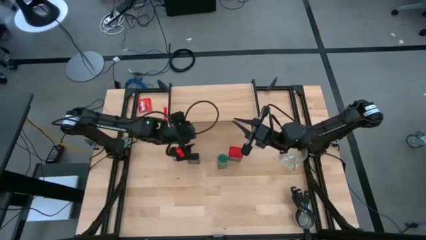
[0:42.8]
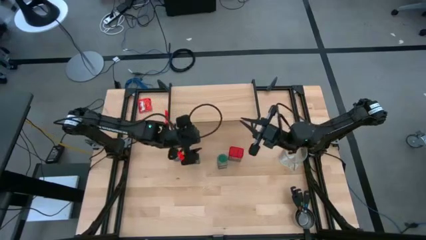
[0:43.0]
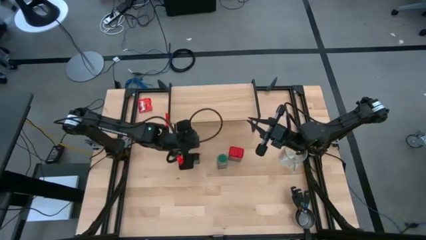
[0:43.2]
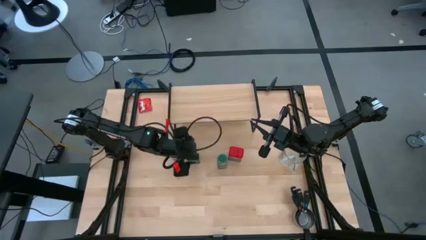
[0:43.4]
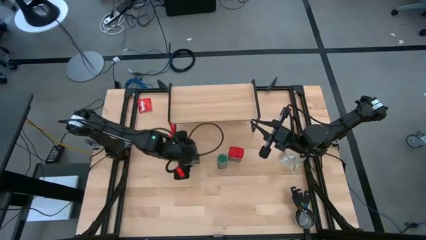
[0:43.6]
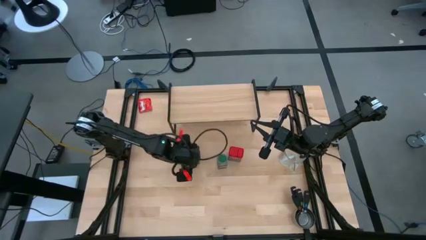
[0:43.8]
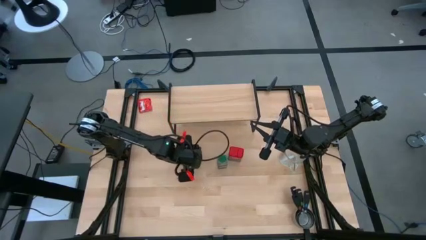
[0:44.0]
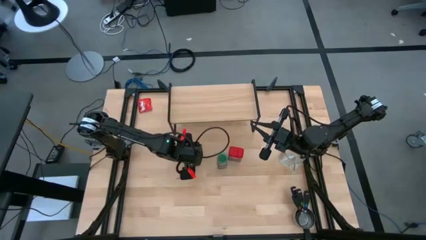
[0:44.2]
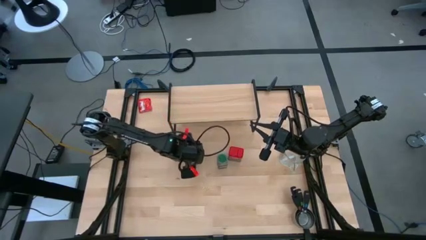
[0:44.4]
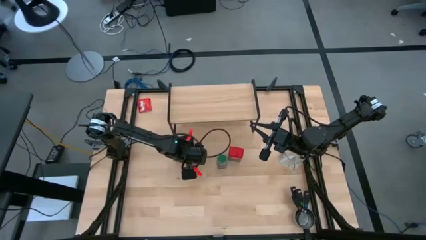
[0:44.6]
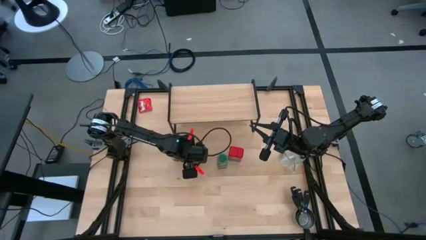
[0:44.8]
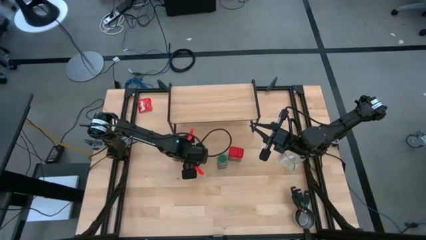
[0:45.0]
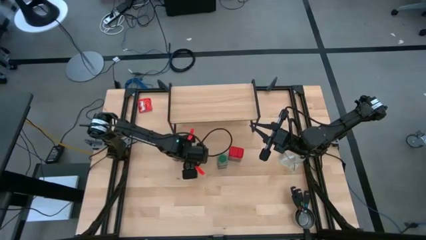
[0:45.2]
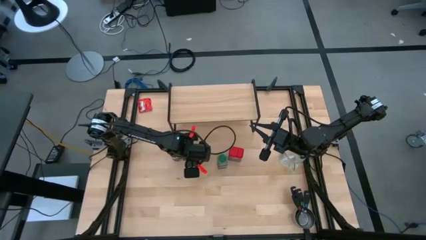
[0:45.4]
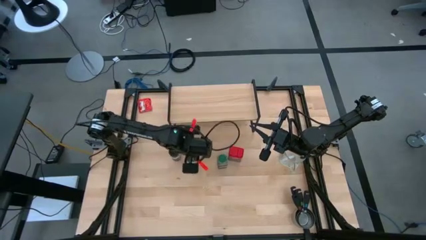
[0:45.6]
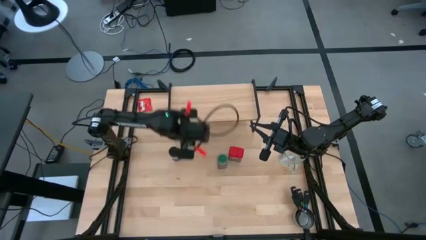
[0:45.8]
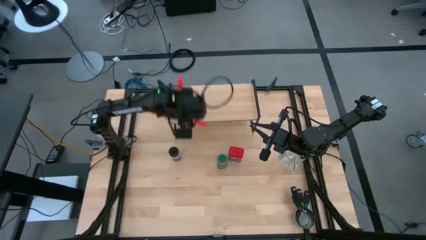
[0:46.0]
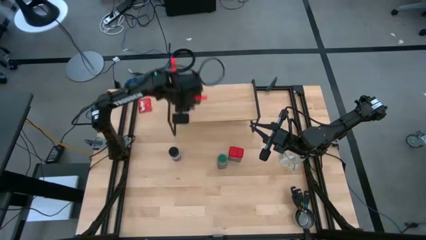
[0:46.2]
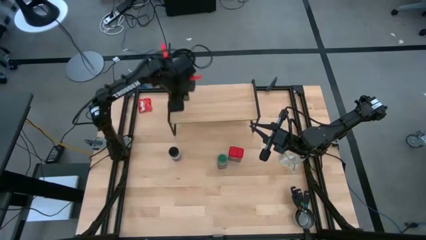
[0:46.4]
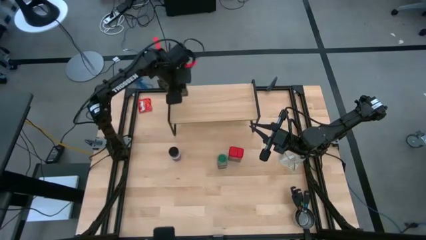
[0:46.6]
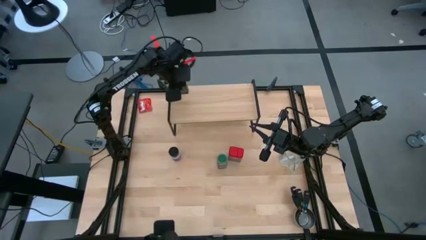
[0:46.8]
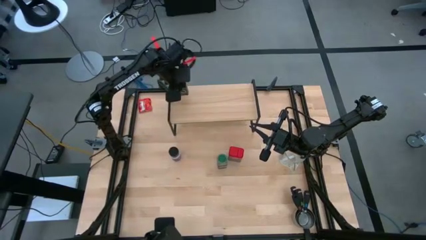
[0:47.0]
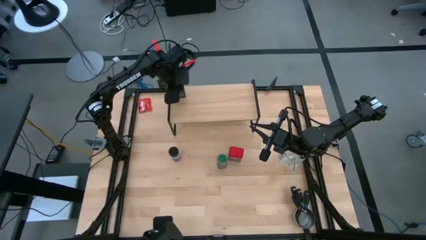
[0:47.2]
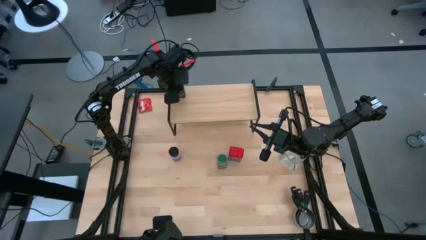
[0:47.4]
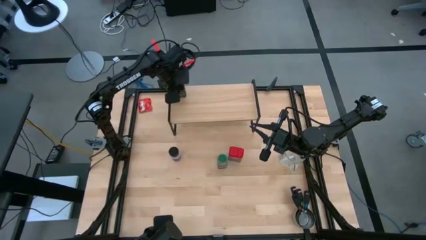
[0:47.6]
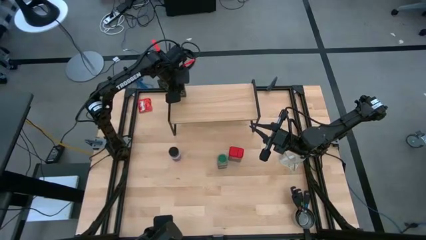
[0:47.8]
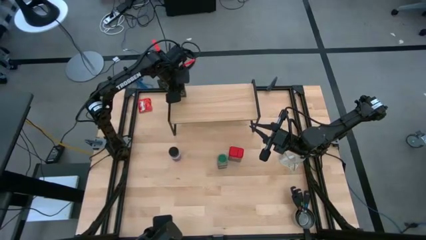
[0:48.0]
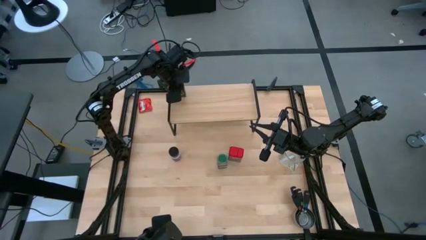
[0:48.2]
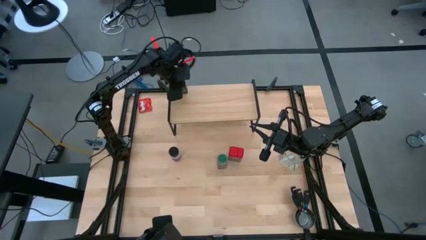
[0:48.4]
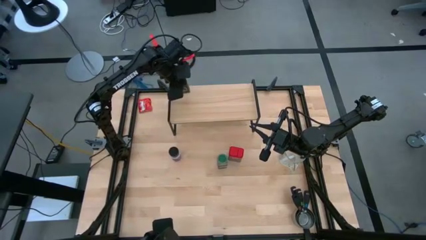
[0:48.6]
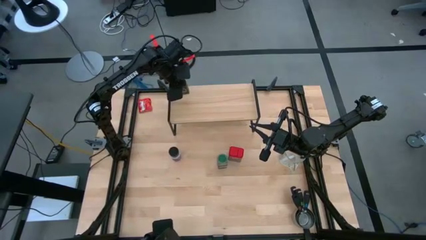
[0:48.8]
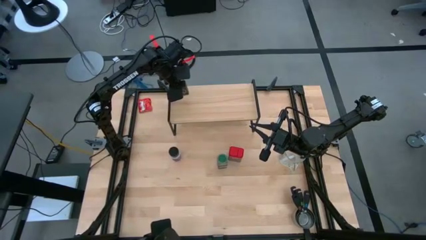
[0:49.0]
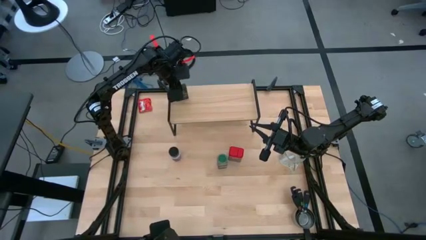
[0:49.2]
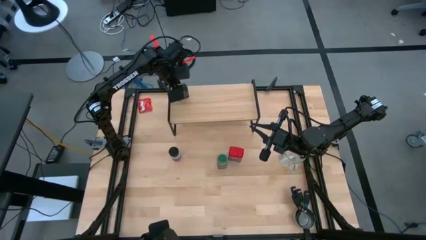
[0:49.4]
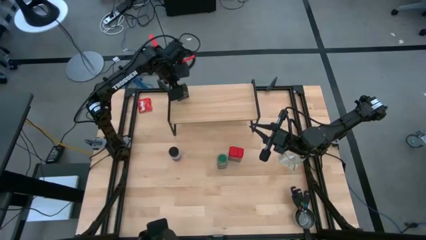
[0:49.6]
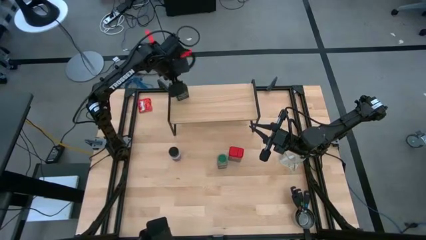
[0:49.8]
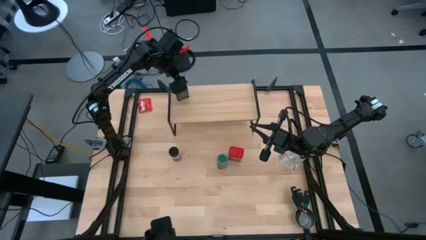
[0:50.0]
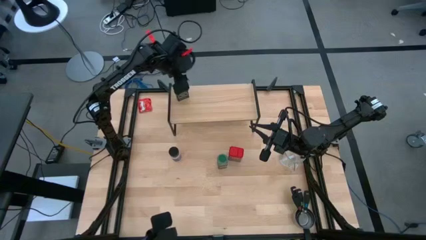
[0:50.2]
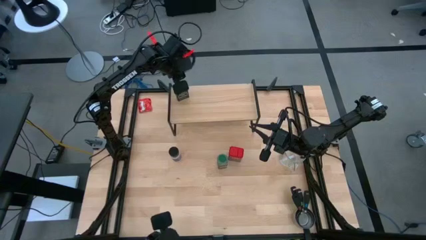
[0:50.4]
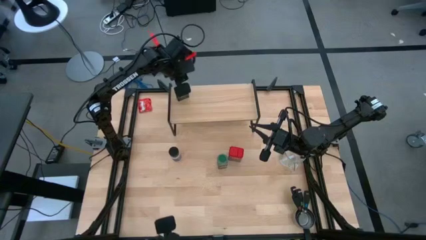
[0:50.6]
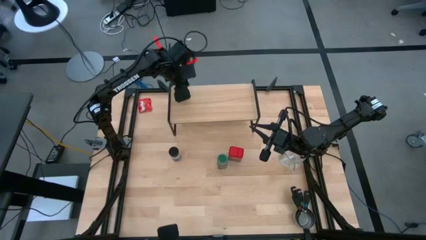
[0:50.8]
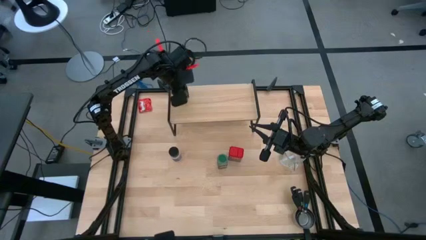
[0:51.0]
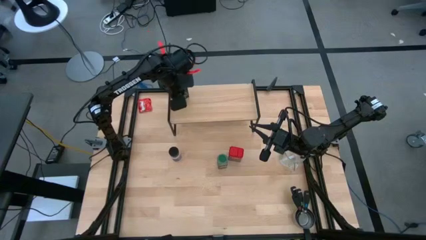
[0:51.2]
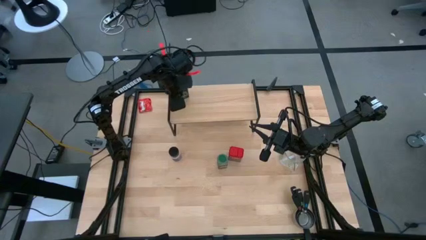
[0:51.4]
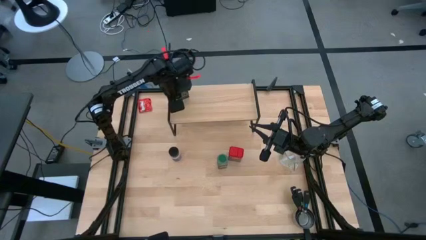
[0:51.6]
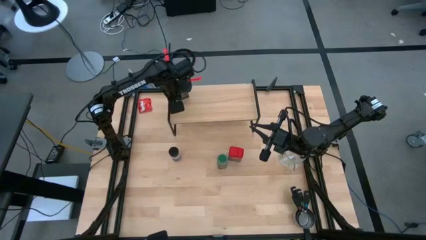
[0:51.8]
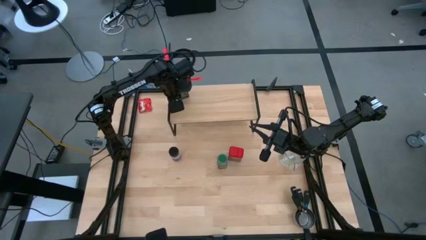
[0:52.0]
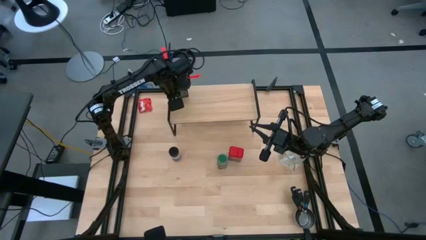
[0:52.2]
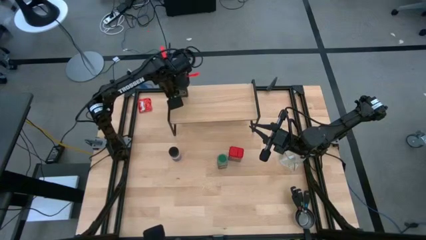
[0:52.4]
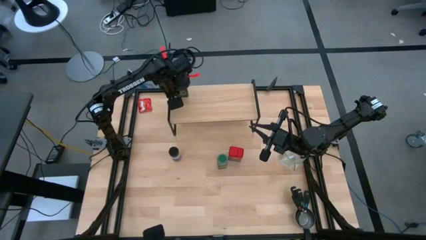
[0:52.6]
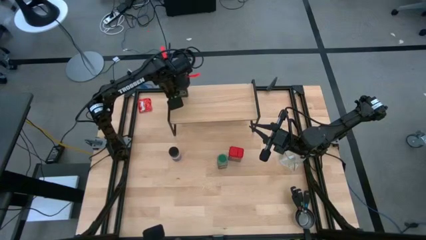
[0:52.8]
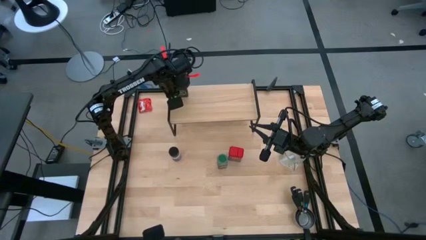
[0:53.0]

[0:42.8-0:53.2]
Task: Shelf spices
Put the black seasoning can on the shelf

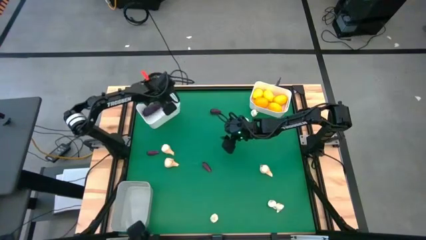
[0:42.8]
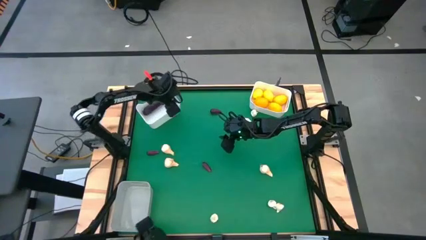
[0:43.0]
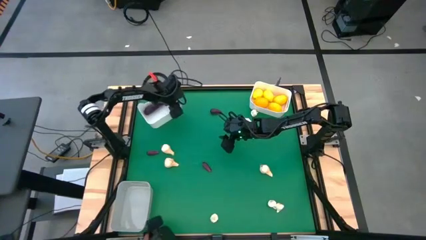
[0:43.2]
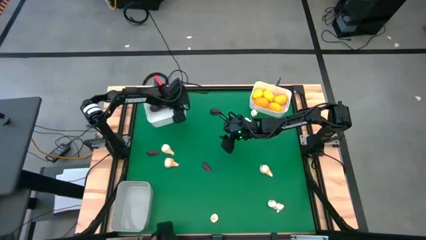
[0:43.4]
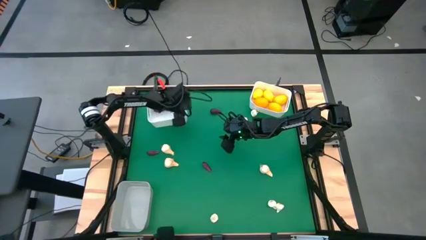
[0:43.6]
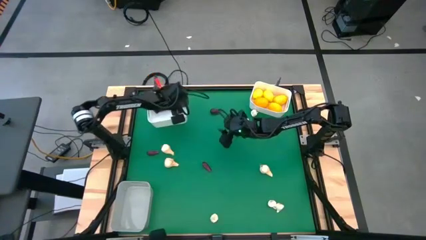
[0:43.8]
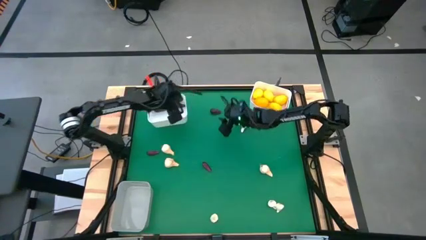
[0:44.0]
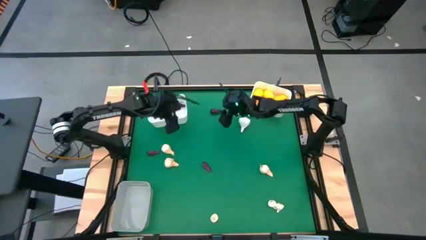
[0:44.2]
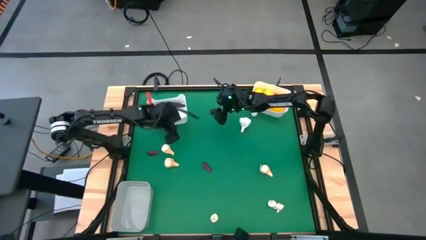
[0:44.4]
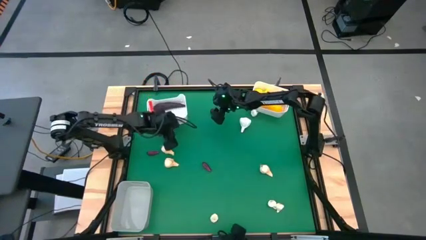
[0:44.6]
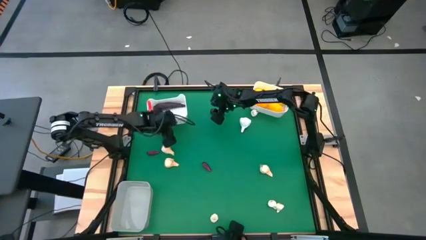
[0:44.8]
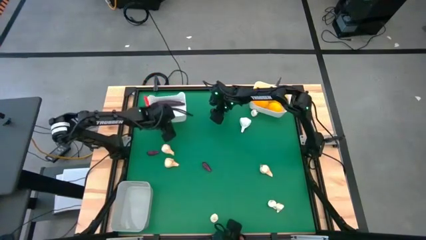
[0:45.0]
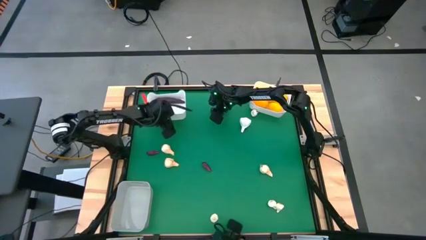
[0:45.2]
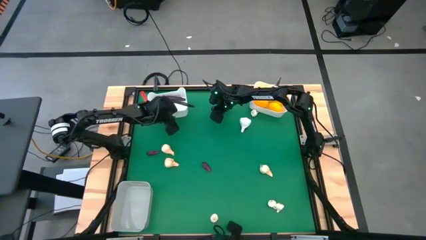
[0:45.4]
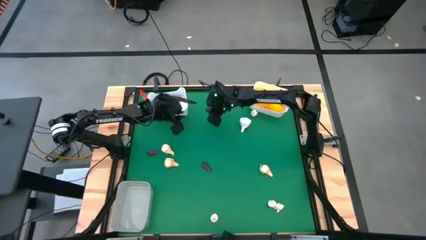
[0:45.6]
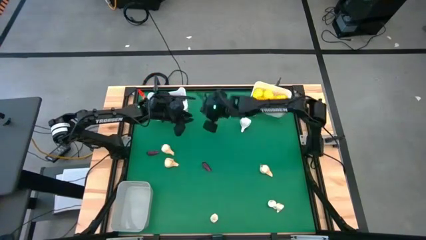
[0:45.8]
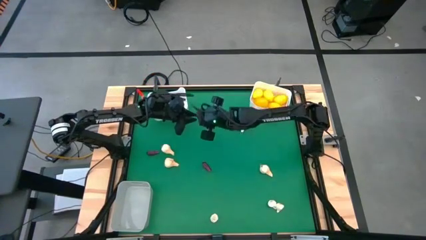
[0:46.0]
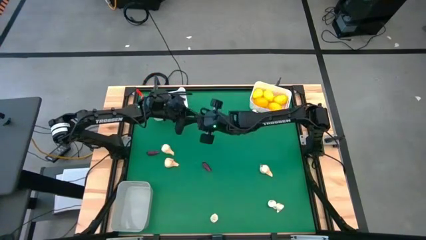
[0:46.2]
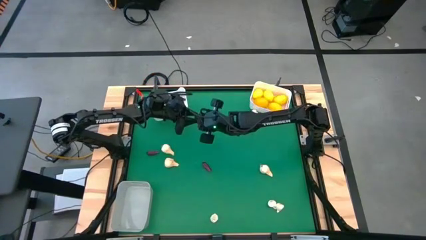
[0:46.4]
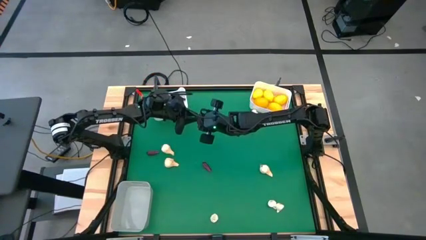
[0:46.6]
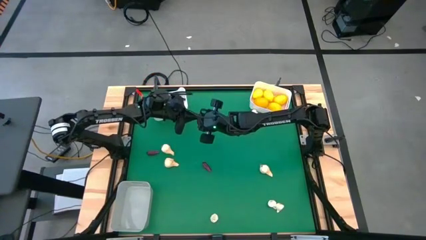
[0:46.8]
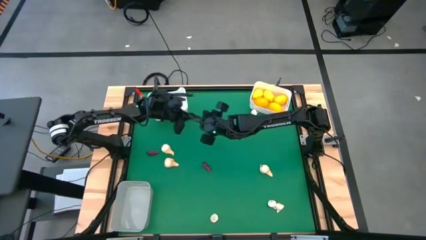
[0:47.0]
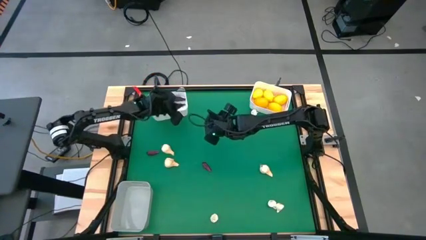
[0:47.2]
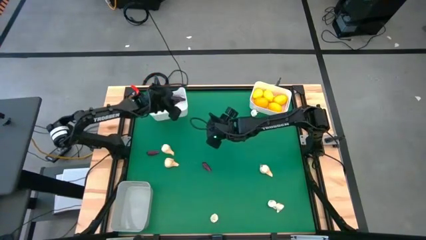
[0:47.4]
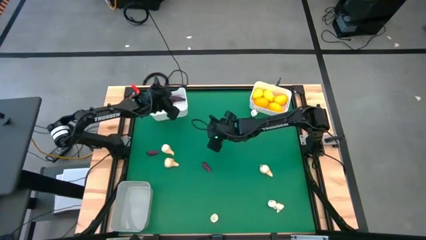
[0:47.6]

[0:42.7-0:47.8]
Task: Sort produce into baskets
Put the top violet eggplant into the left white bin
